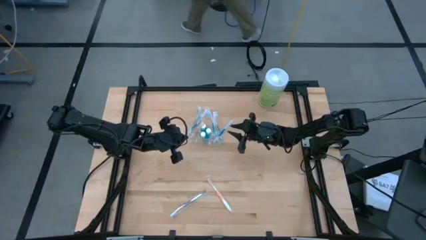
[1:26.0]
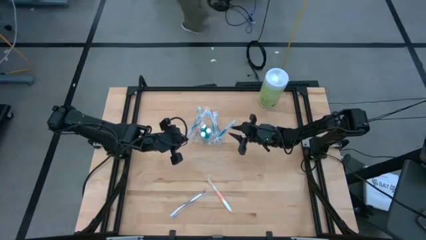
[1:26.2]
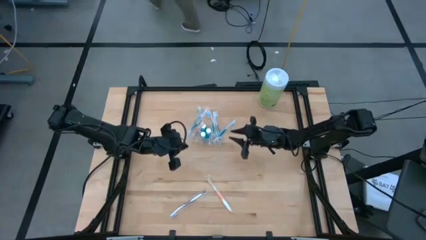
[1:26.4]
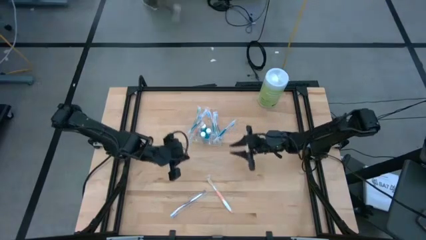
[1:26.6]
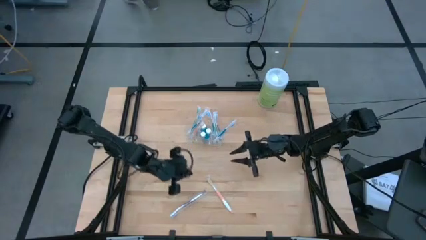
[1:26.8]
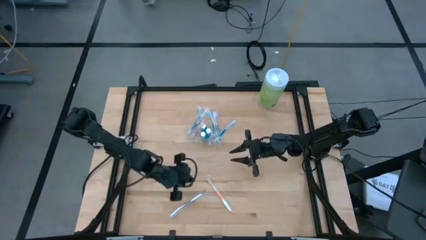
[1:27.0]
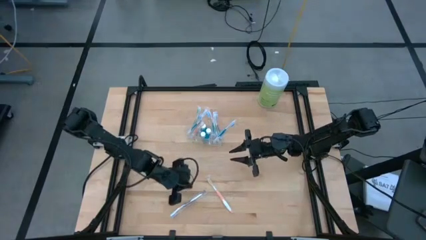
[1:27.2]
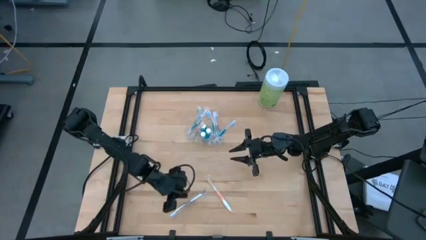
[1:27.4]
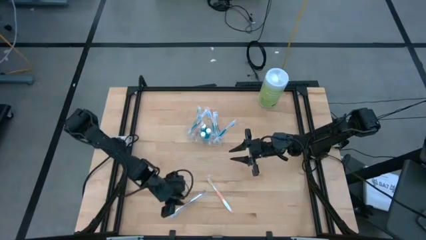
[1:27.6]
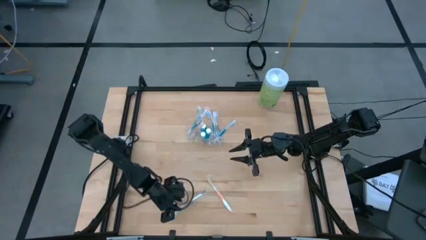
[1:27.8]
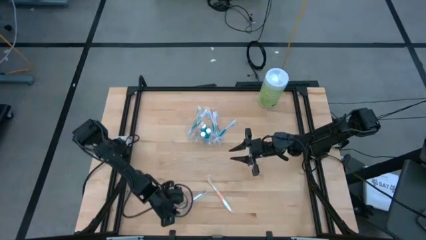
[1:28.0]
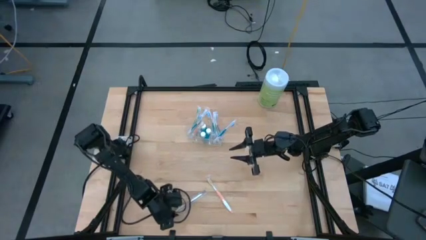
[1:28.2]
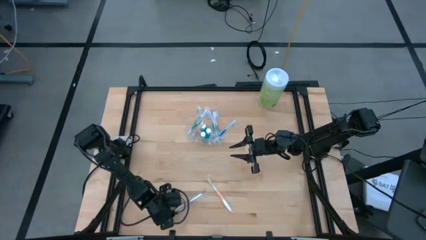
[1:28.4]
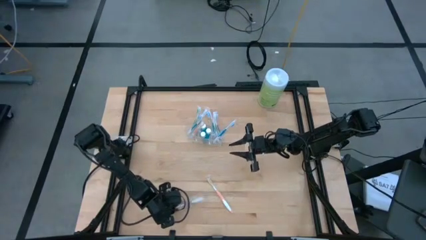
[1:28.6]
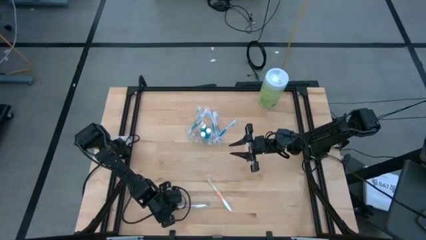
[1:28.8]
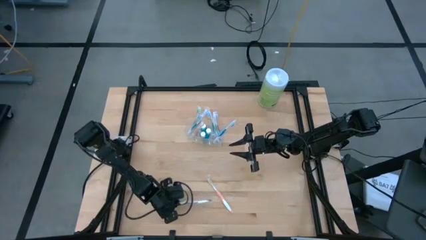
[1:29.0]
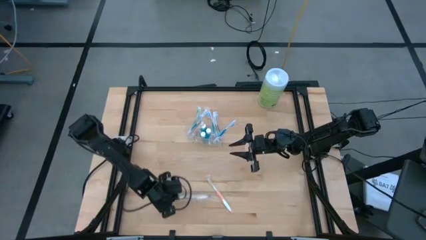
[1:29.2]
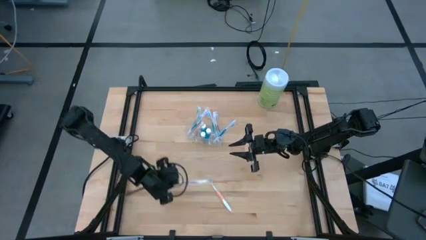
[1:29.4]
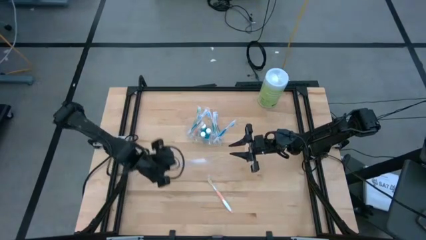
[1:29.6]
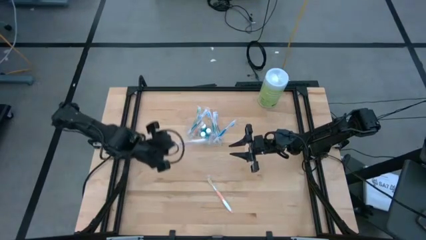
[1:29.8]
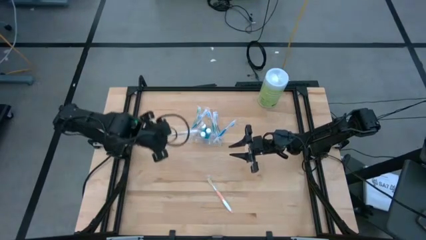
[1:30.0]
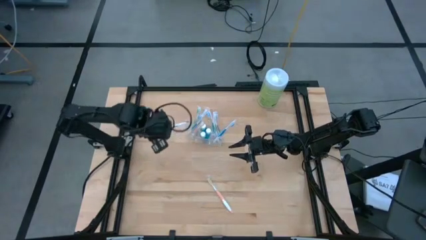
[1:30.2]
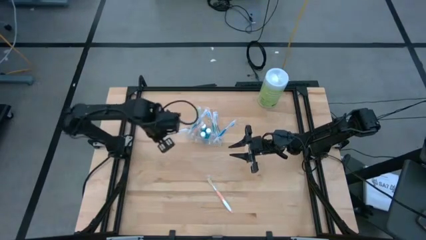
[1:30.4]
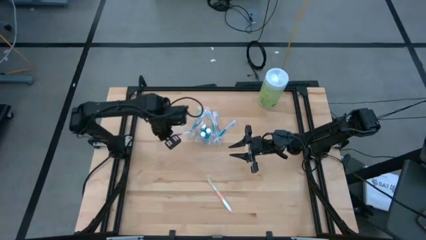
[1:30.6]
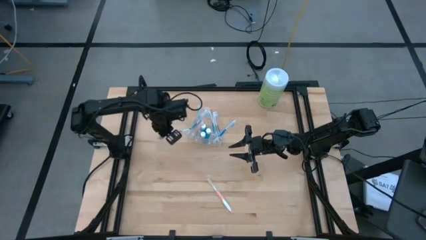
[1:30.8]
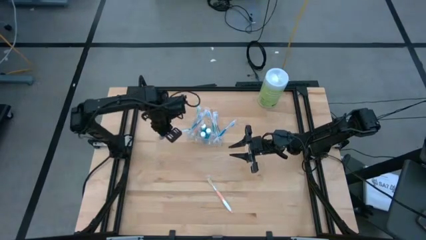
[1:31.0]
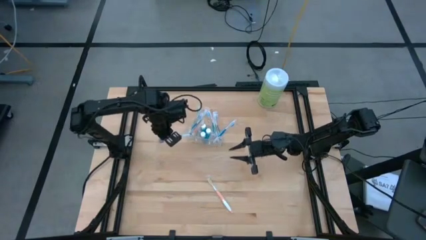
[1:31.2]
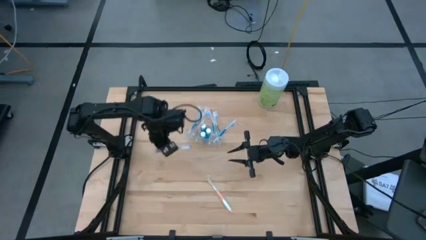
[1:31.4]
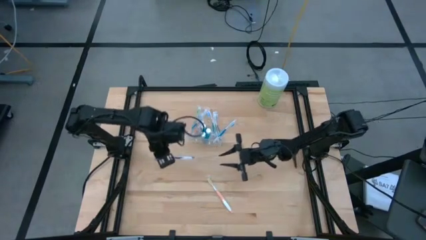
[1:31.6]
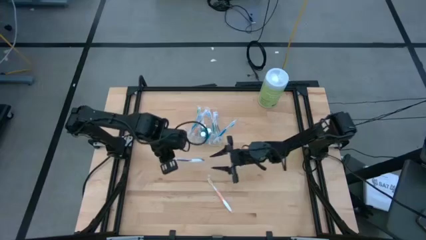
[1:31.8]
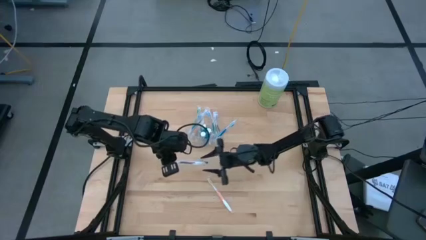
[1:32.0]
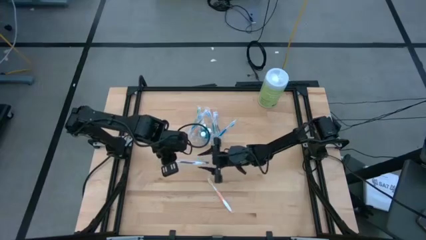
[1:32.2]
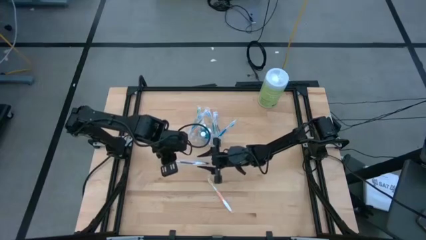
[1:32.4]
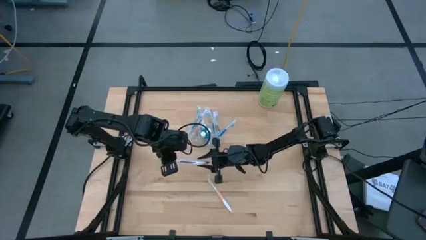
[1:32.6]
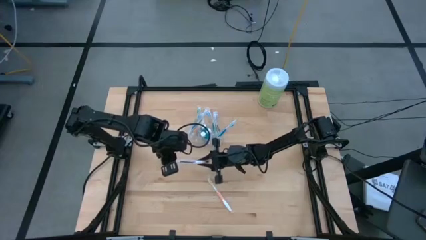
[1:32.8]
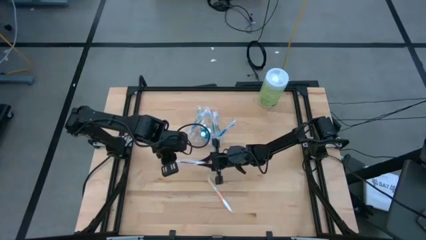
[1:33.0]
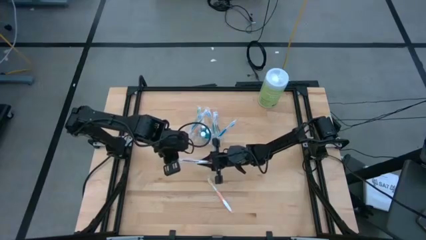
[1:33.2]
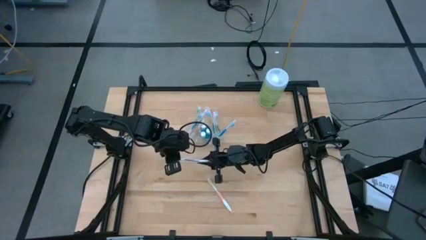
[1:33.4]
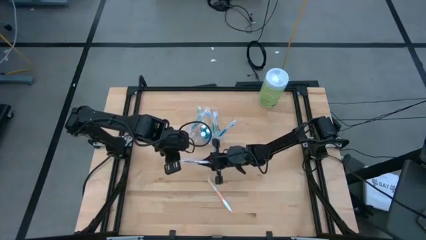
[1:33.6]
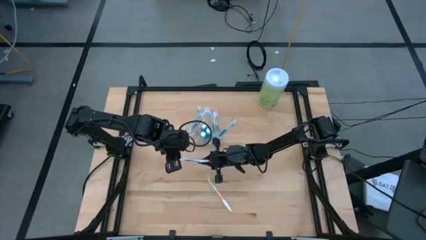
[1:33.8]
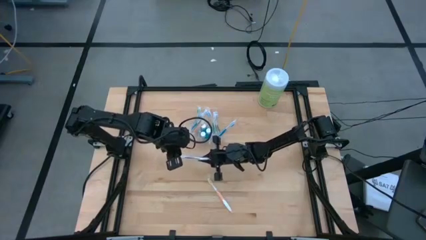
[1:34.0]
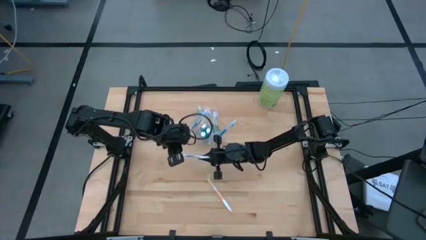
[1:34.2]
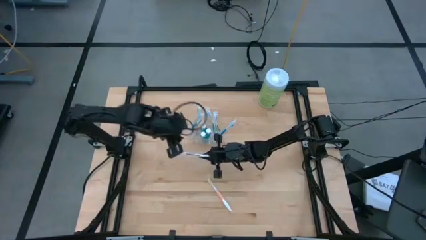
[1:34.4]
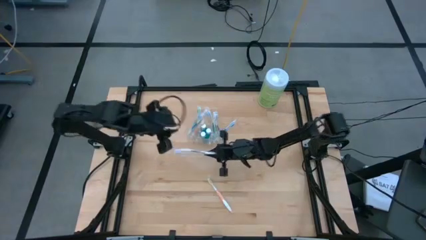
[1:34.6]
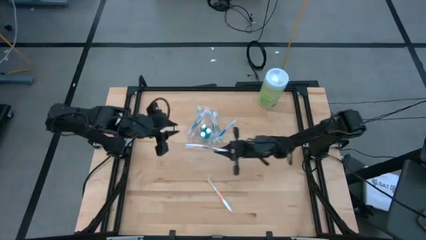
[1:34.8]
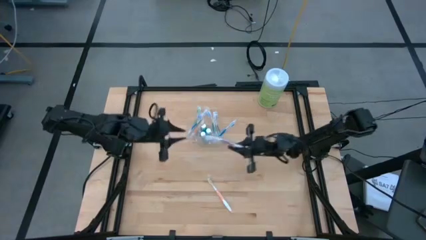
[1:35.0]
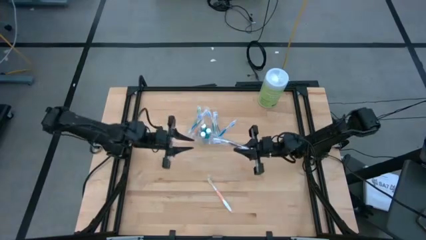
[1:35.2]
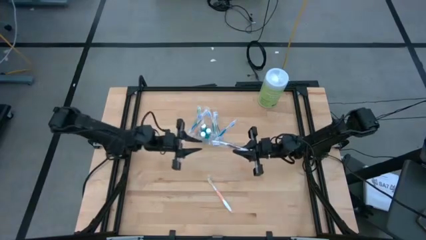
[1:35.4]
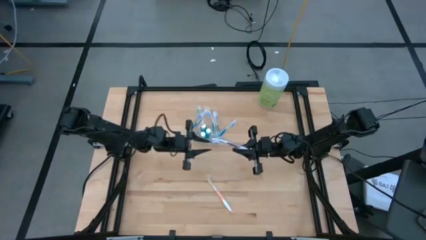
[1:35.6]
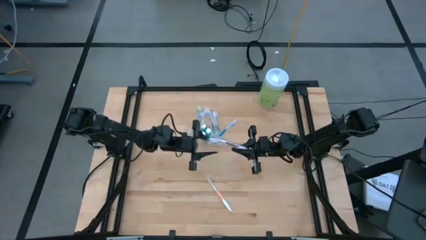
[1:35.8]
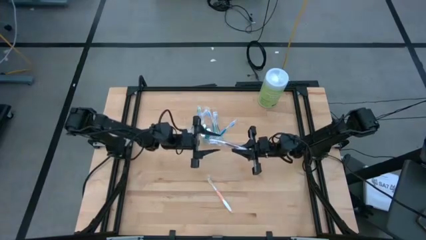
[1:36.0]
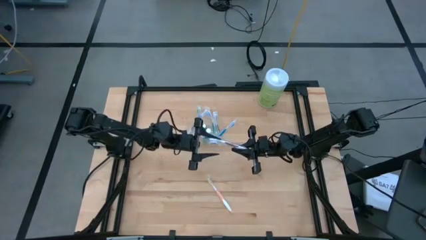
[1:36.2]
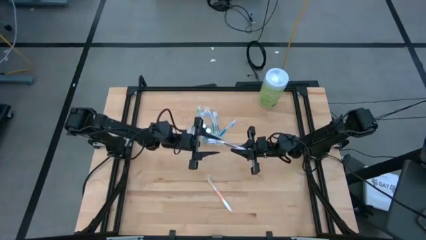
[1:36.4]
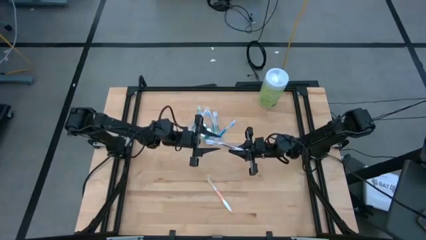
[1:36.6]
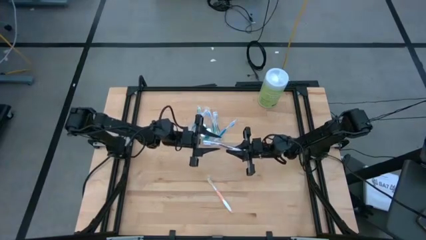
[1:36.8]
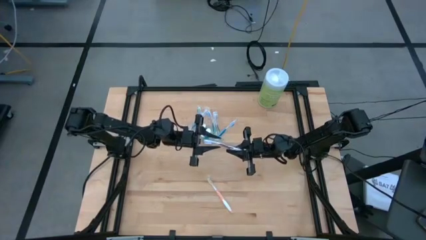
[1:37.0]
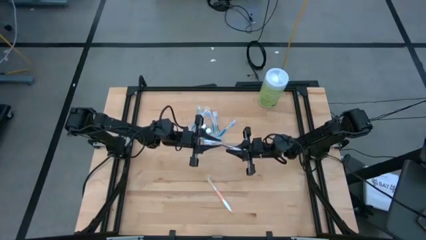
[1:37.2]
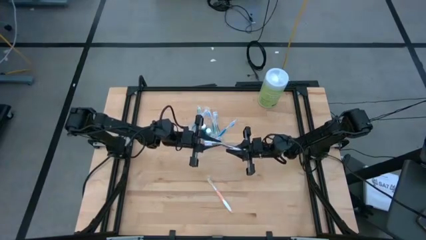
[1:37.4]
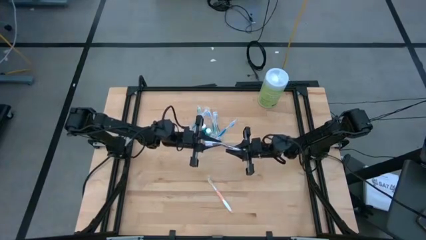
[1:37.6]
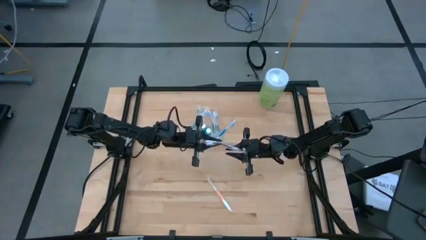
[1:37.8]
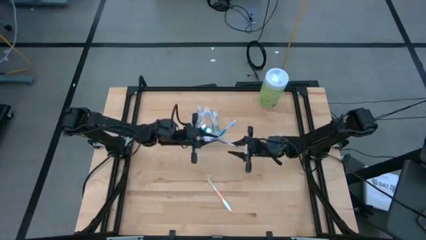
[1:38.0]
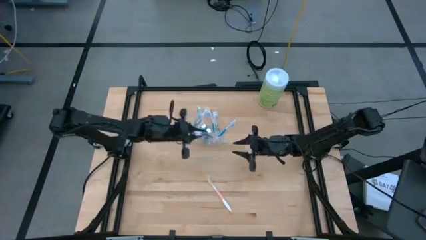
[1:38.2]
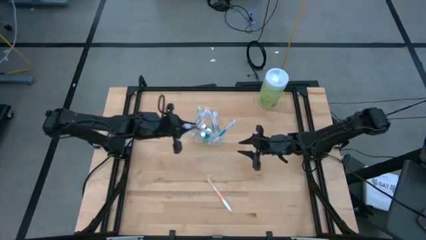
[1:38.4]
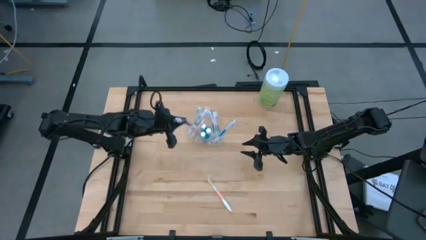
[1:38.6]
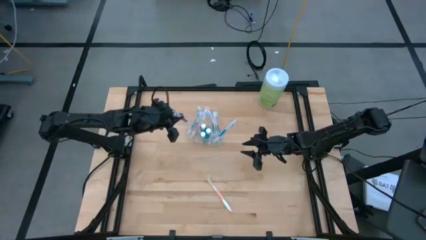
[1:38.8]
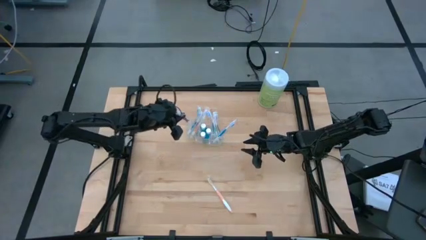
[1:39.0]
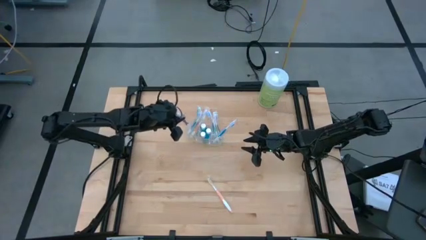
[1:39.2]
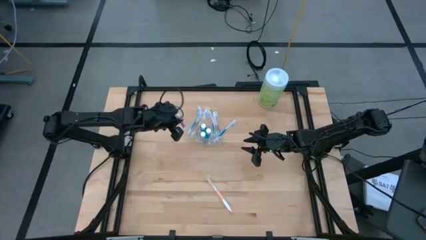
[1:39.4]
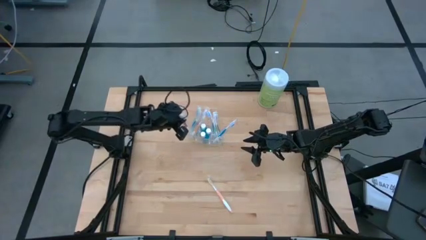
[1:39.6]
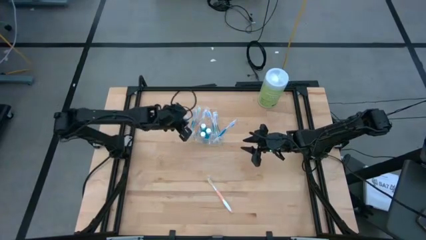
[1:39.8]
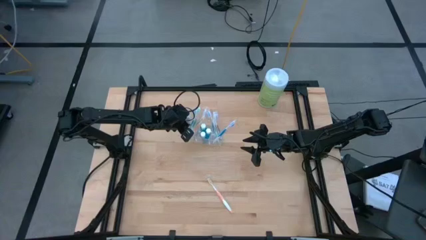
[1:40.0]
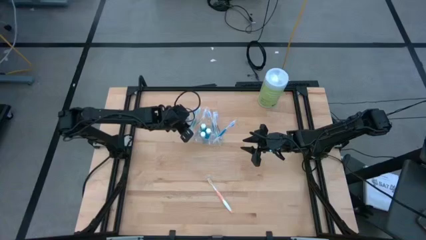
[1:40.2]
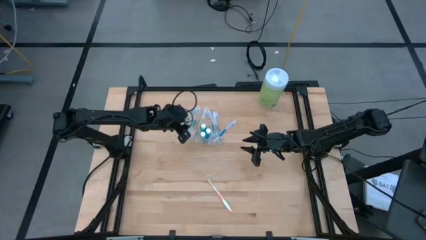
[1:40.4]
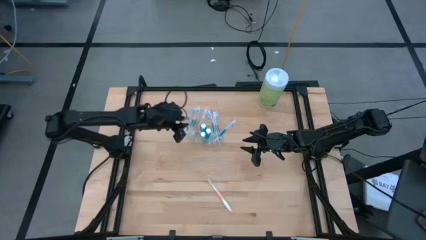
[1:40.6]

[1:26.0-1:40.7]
Task: Pick & Place toothbrushing station
Put the purple toothbrush into the transparent organizer

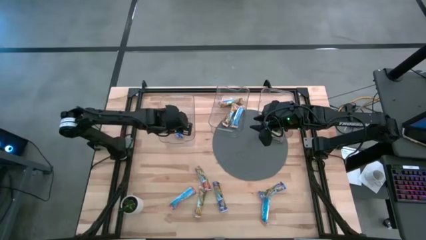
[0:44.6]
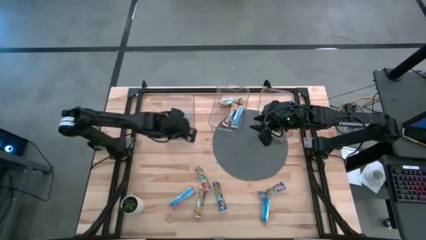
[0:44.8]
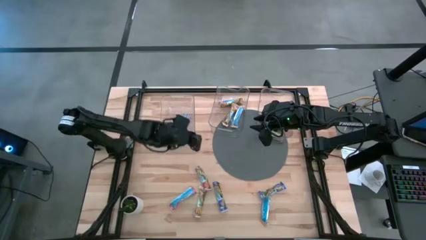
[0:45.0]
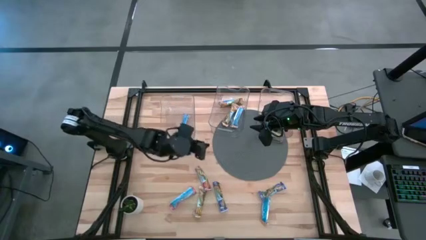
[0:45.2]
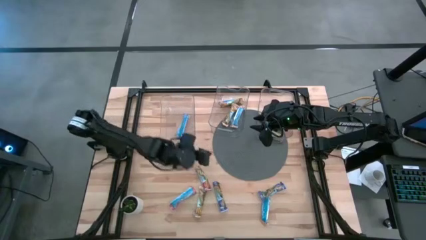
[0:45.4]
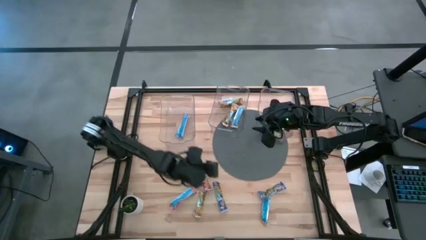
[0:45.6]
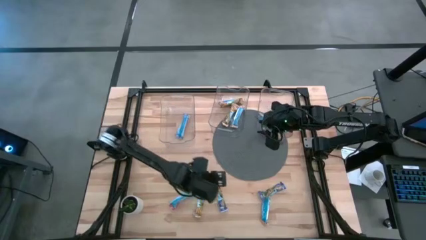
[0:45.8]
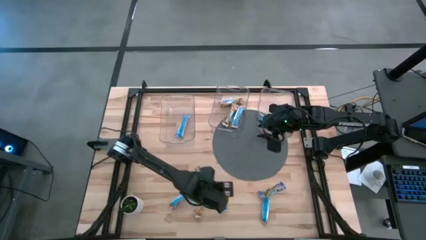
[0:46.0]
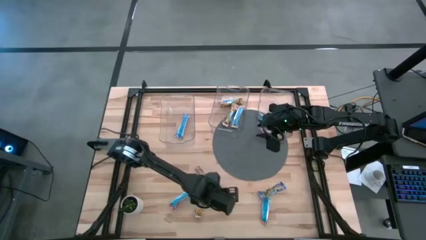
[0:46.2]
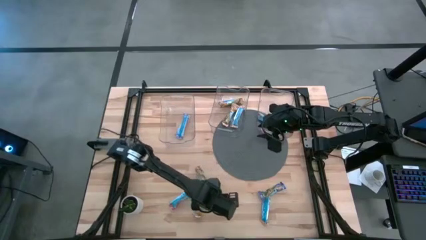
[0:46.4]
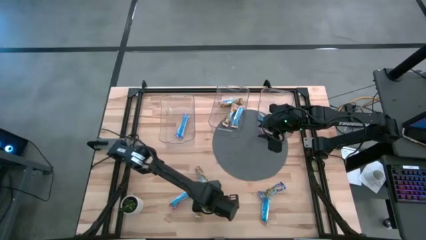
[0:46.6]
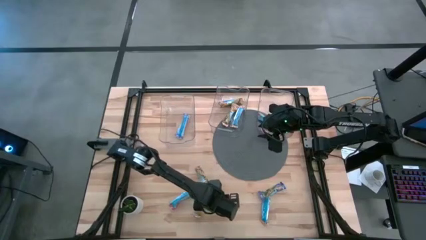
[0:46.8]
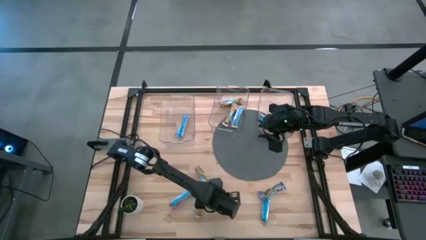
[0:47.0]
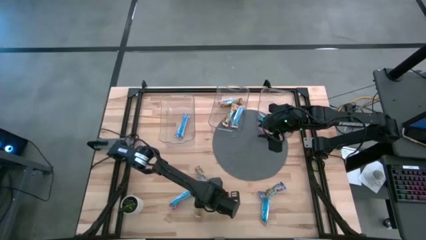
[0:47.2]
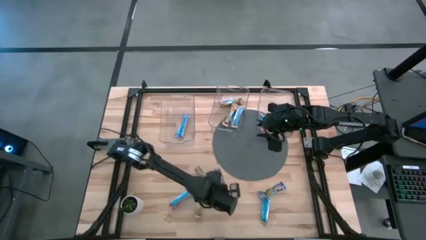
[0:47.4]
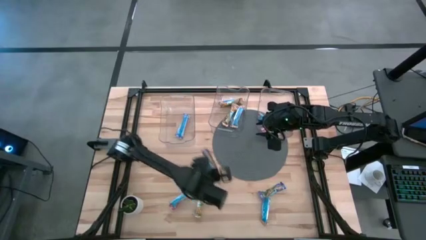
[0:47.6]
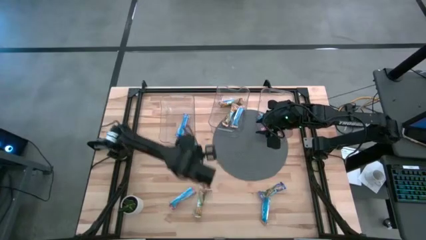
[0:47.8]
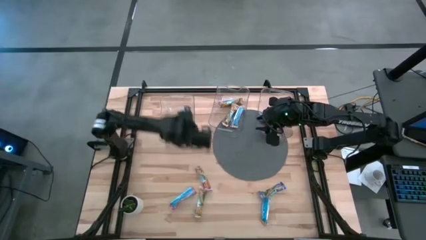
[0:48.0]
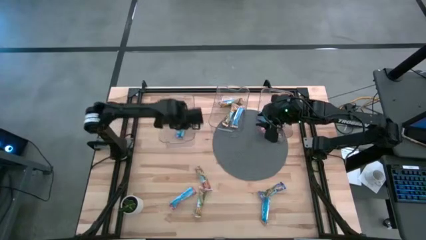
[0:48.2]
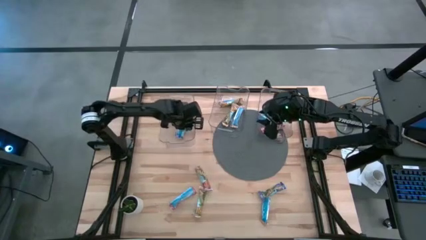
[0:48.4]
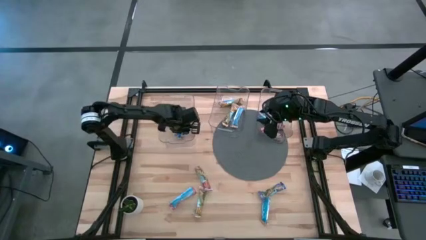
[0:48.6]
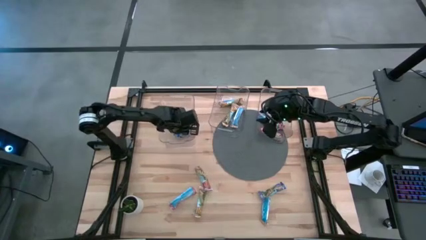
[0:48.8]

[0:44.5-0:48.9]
Task: Pick and place Granola Bars by type
Put the blue granola bar into the left transparent bin
